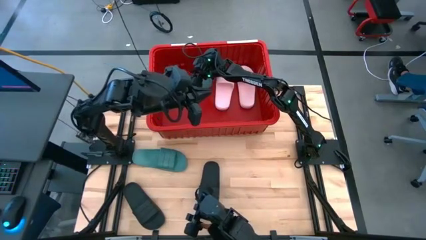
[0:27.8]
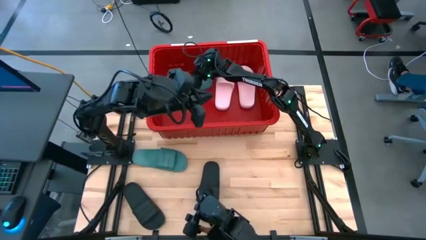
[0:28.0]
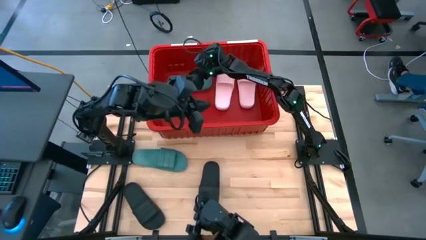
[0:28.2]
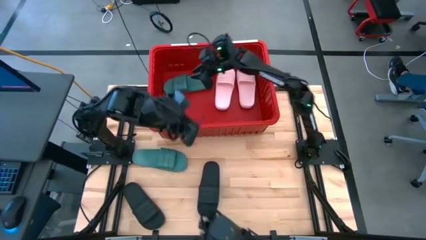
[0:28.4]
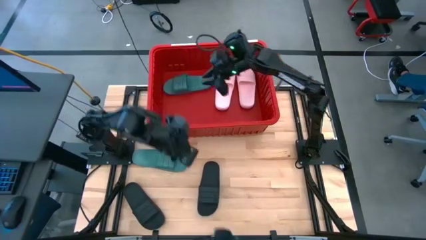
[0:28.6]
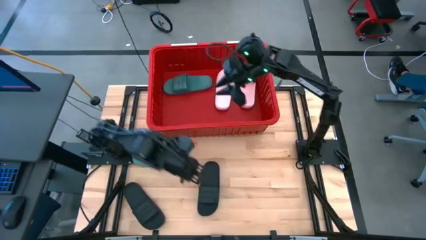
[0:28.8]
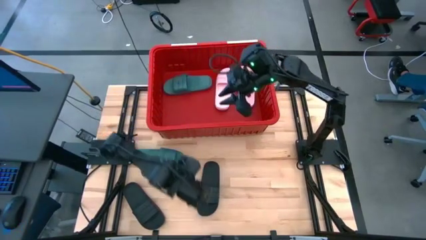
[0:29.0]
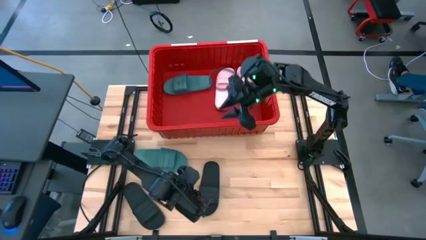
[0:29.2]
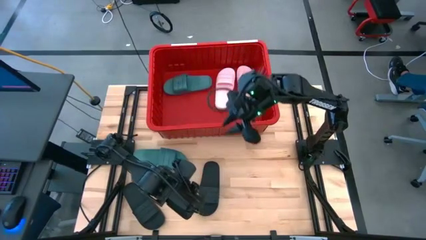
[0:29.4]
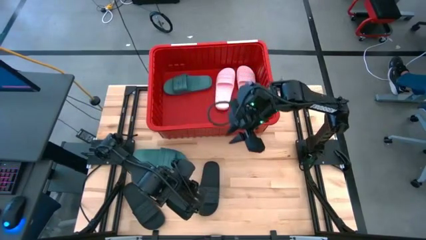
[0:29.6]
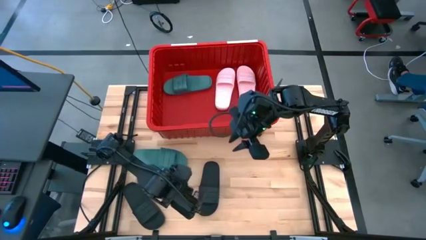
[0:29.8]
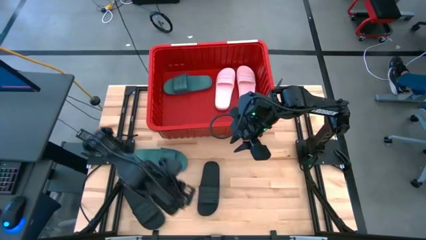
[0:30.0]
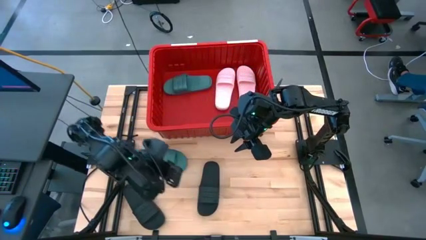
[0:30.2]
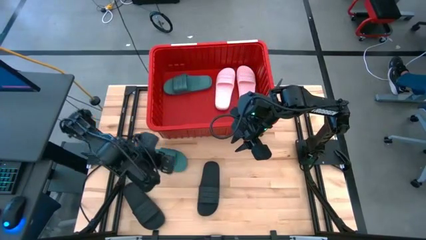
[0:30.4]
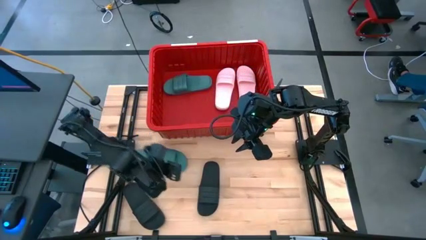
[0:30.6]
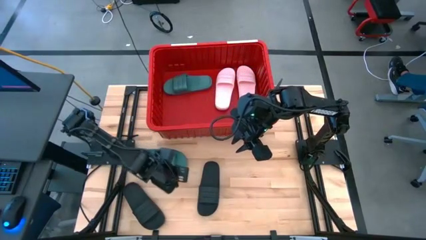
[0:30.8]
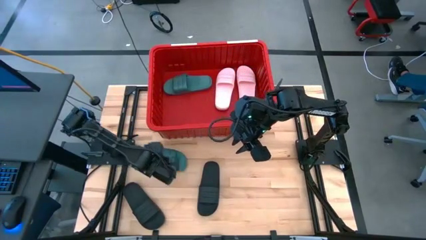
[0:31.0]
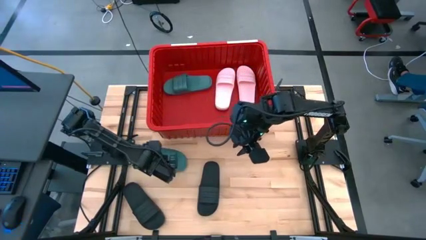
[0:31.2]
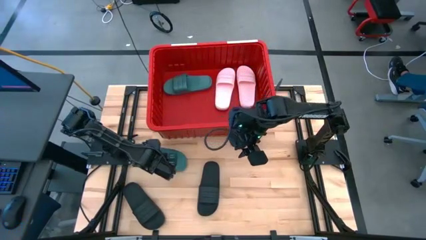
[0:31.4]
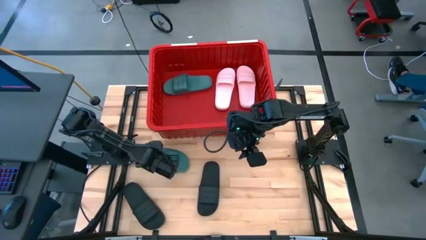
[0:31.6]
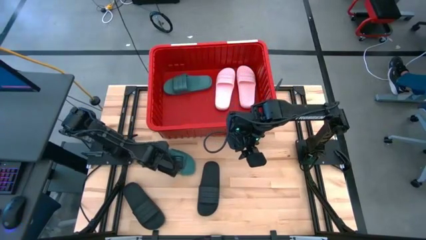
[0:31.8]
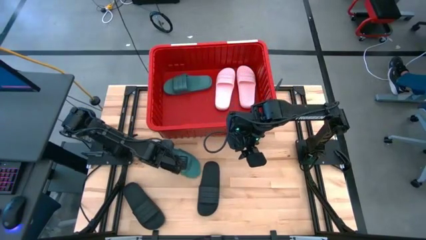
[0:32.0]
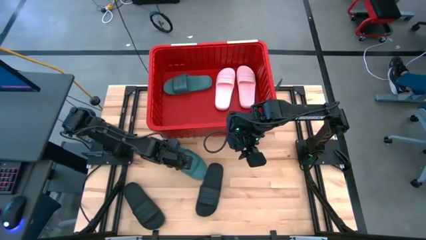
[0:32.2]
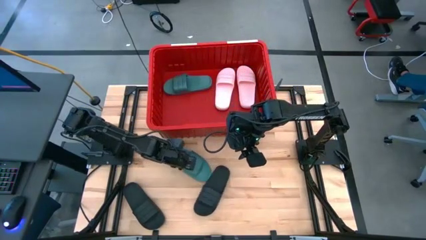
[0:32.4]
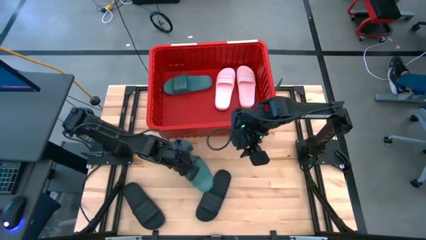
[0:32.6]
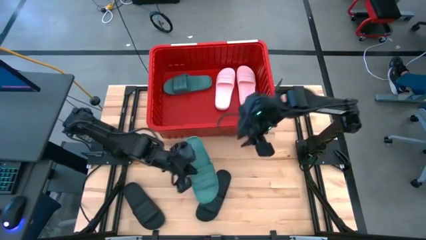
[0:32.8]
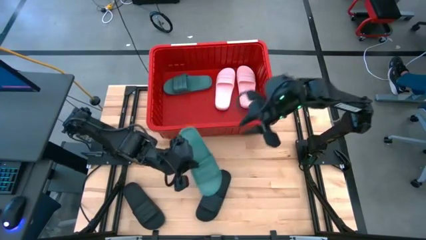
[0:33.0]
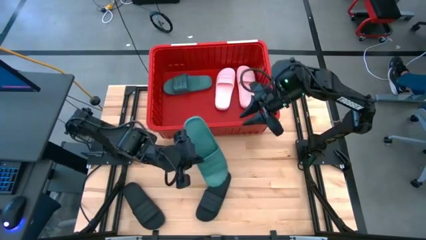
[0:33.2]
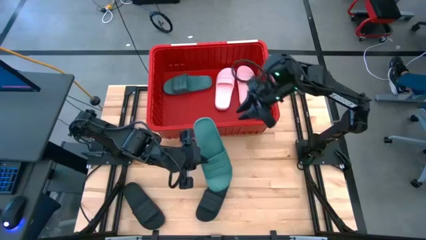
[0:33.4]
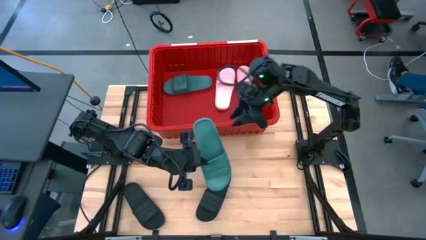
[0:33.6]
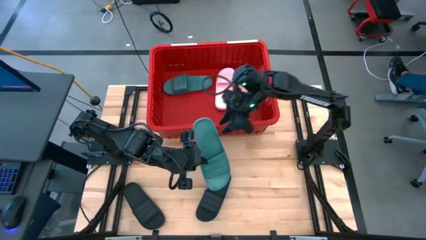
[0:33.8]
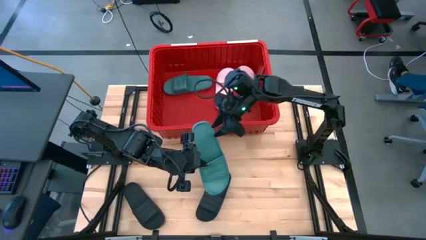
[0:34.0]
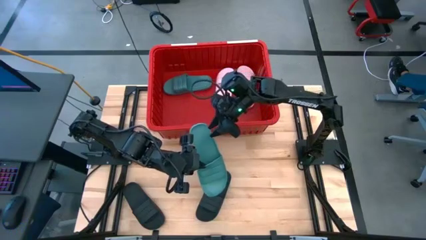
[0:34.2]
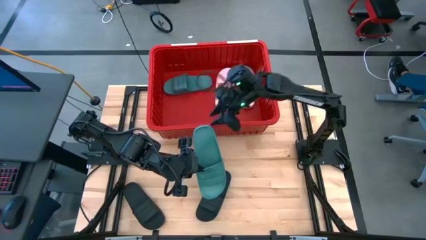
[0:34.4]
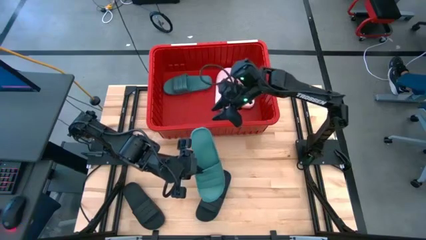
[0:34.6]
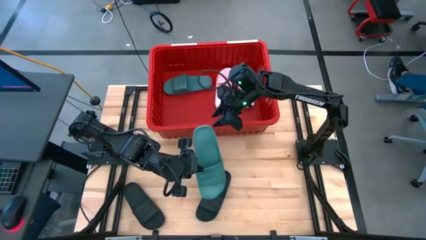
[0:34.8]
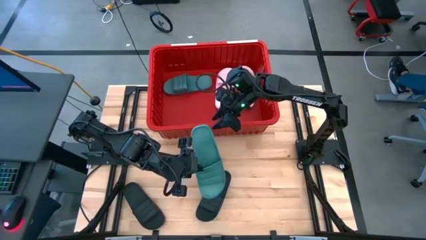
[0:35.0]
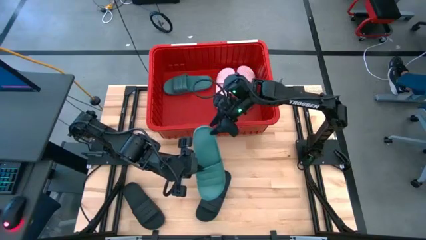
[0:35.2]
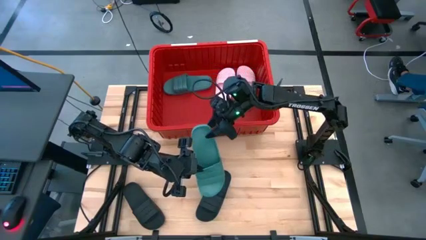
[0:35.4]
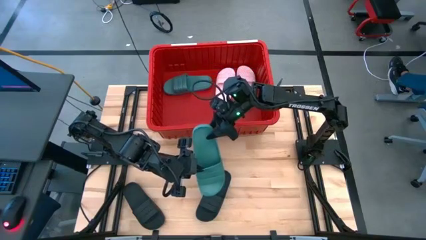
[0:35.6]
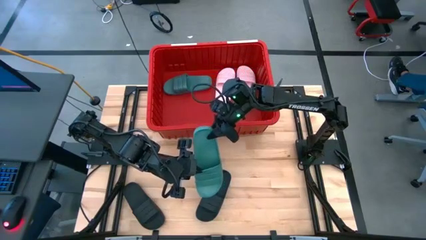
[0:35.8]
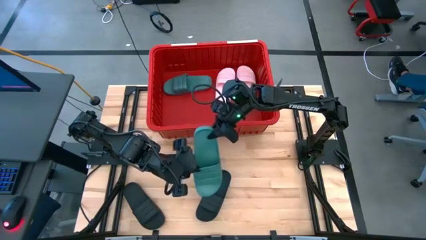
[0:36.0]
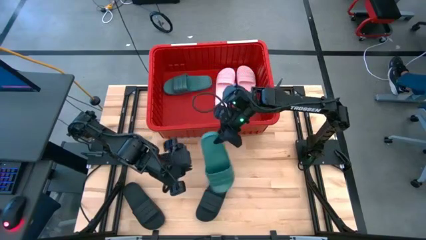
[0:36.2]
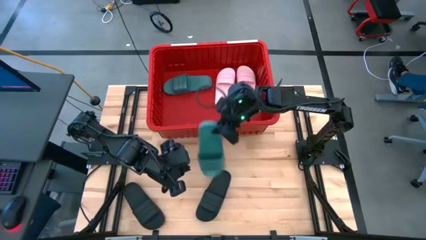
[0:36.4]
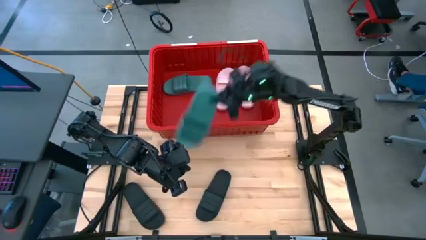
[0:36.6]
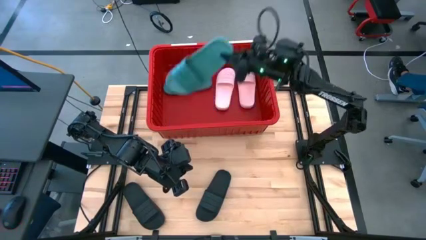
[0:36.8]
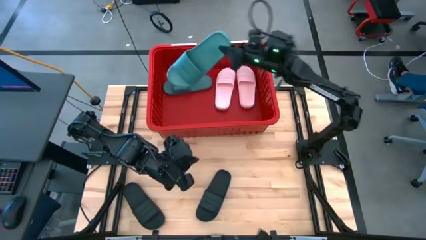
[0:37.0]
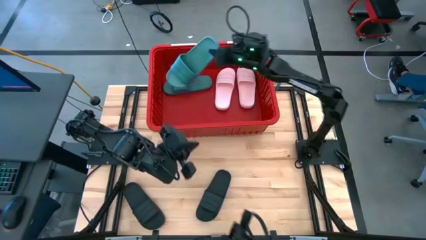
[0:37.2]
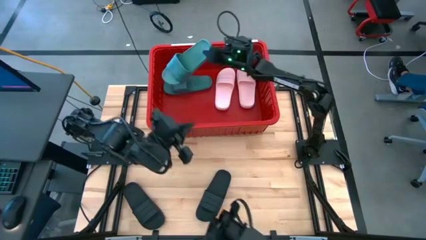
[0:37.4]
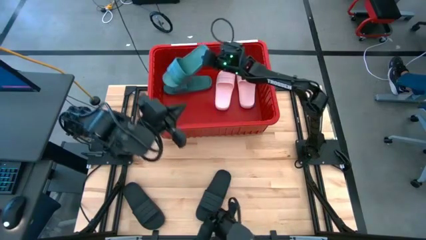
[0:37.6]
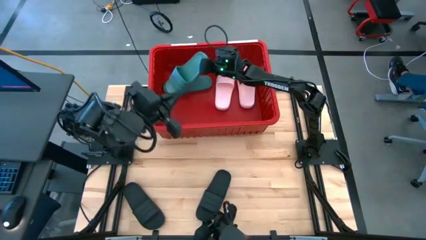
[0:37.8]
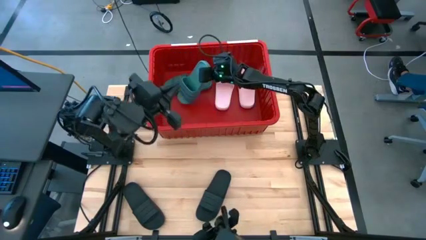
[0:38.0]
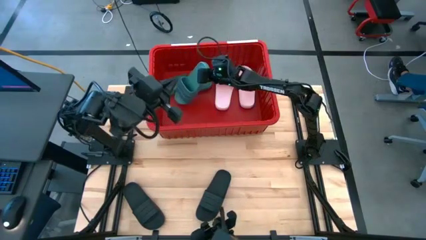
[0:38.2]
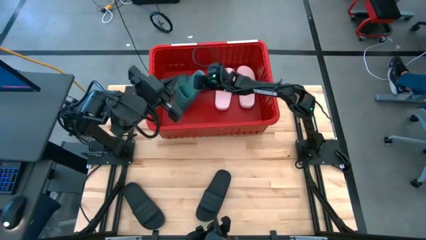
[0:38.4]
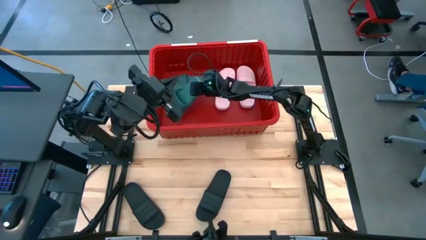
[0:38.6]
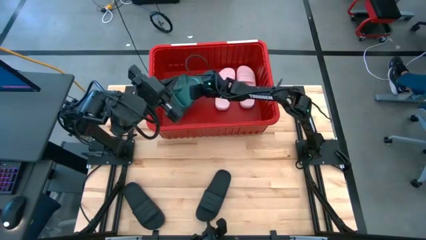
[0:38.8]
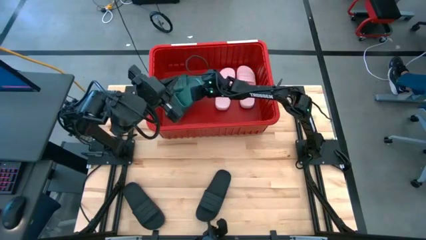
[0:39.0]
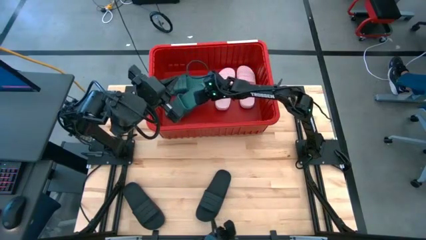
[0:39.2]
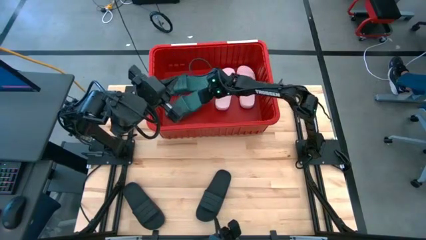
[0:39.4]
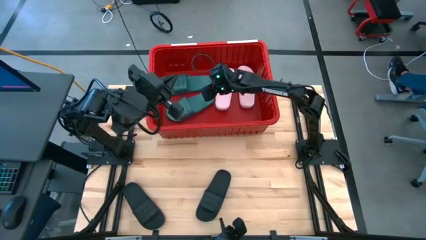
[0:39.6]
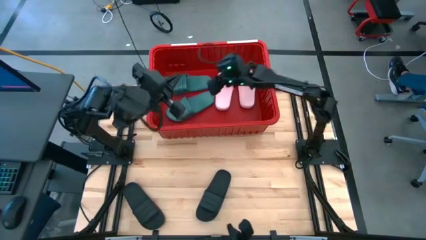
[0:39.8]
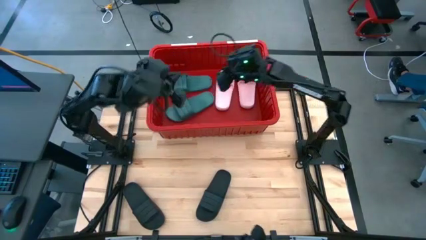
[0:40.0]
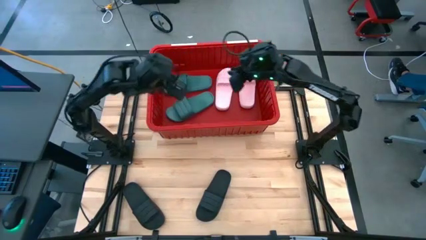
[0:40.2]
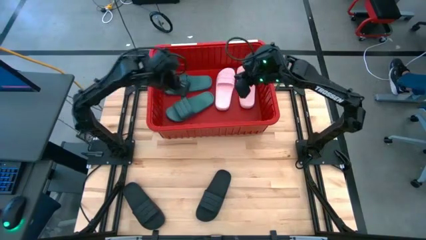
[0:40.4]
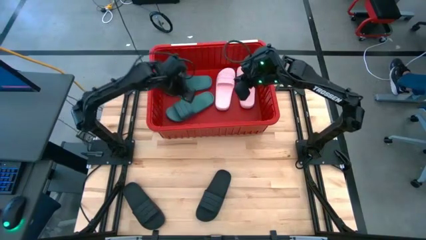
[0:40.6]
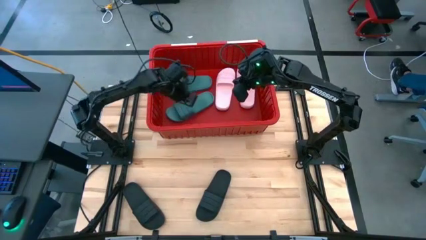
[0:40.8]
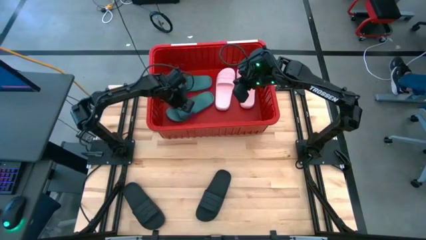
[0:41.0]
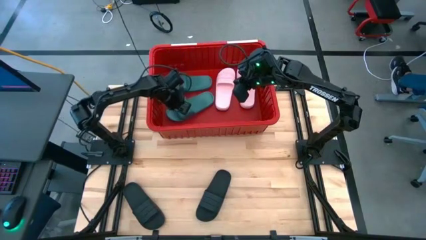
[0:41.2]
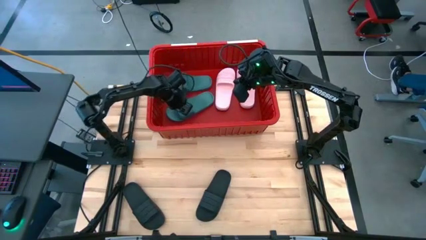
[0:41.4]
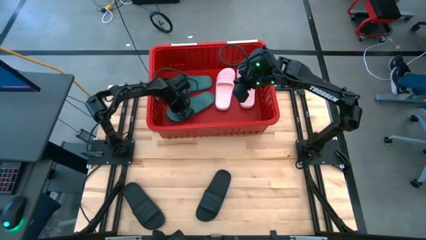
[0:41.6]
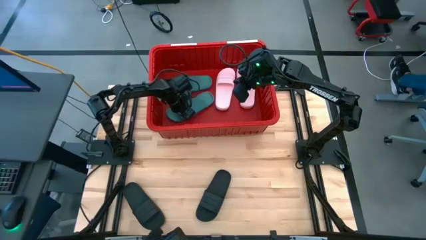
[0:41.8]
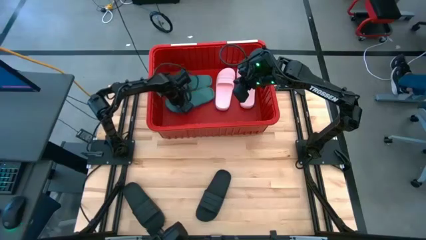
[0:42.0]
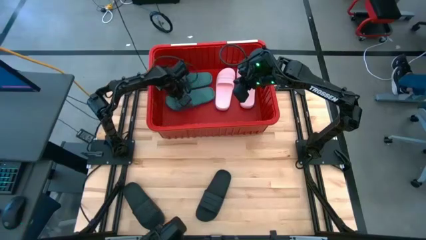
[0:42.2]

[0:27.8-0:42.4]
Task: Pick and place slides into bin
Put the green slide into the red container

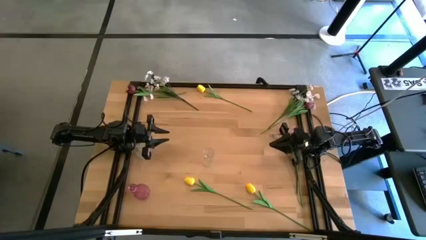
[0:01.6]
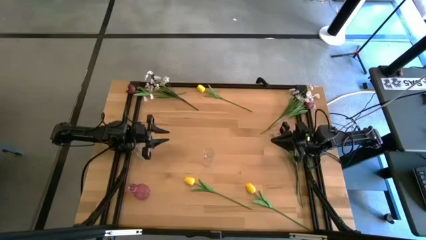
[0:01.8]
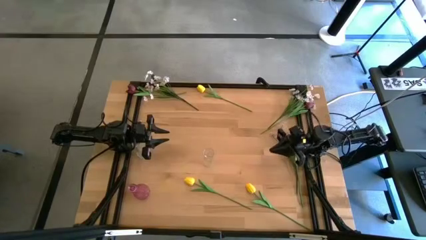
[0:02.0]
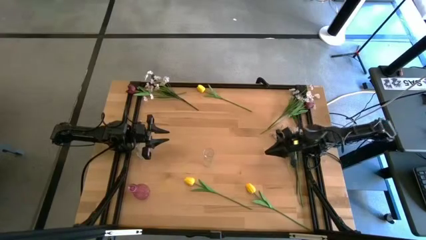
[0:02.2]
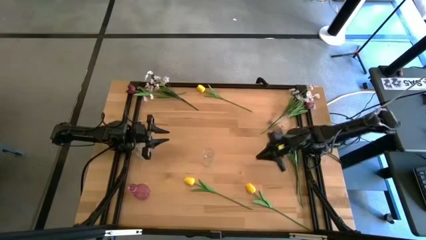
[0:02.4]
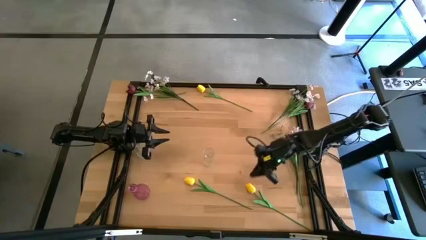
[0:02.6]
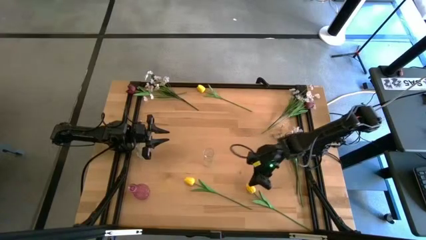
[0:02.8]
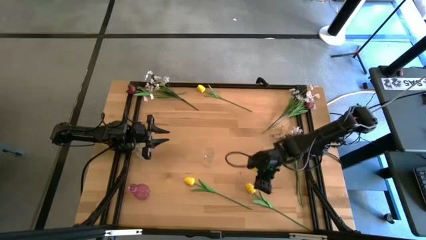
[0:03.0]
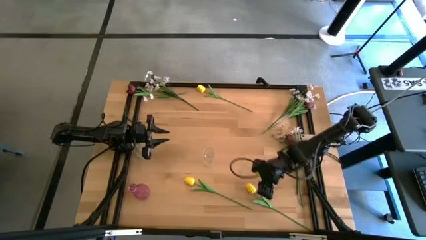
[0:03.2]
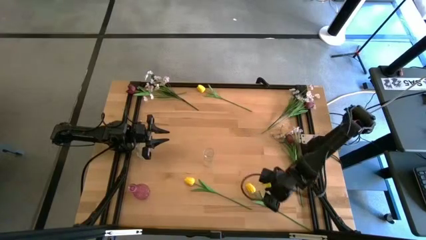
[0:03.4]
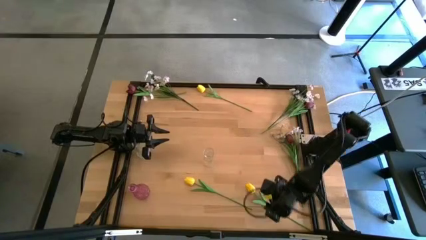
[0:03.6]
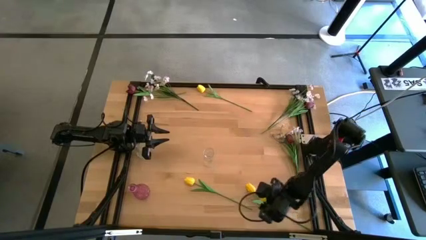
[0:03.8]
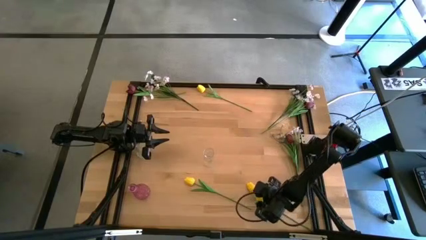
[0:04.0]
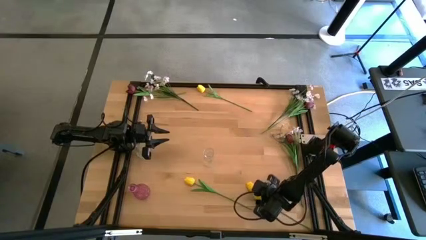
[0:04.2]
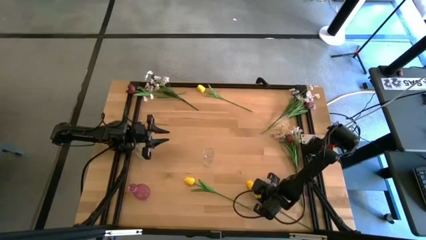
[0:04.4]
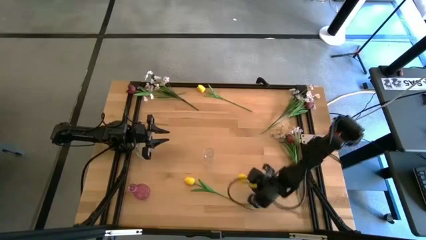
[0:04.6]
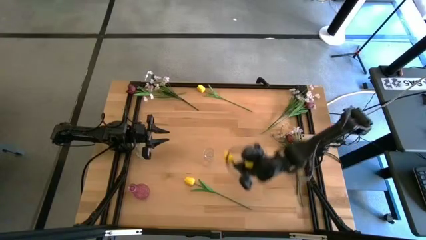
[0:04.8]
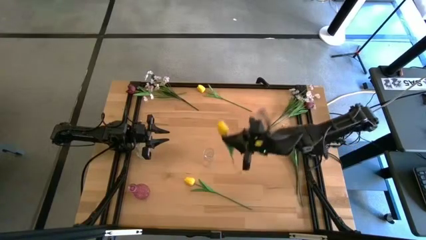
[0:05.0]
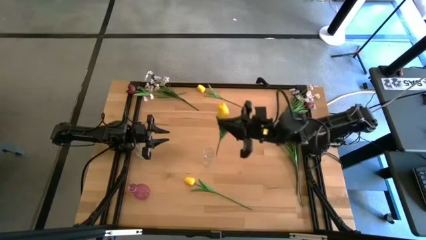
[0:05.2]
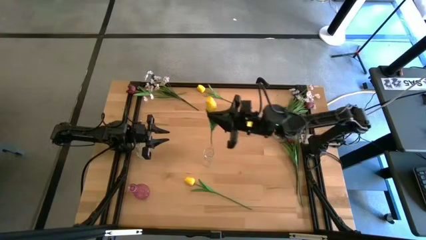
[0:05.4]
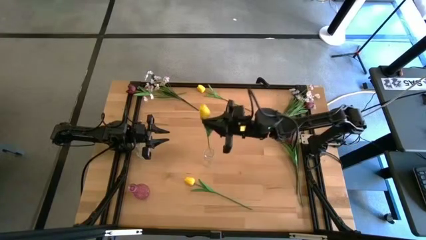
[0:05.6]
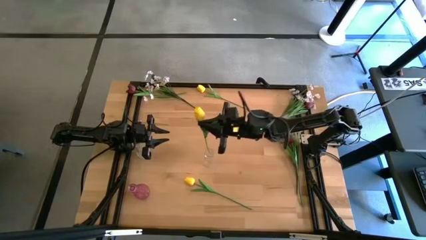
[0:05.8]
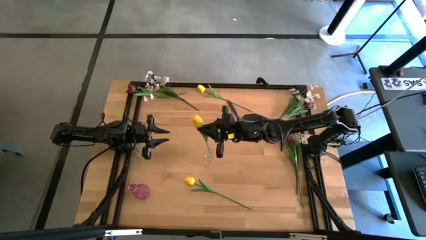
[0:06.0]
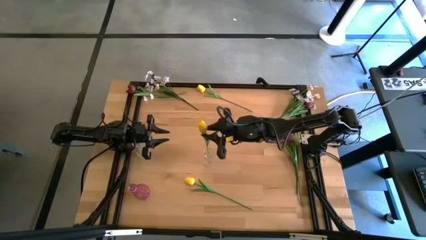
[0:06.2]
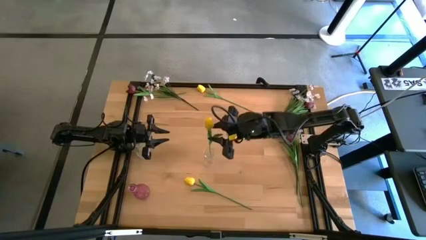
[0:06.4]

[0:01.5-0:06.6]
Task: Sort flowers into vase by color
Put the bottom right yellow flower into the right transparent vase
